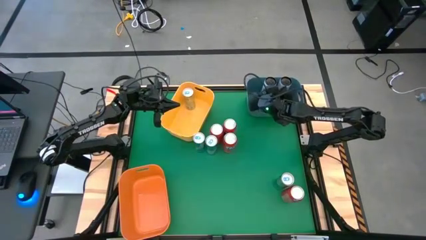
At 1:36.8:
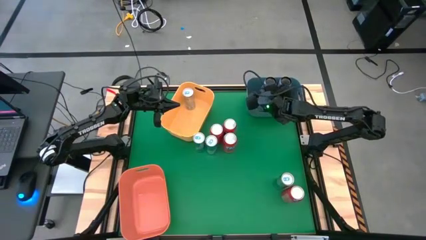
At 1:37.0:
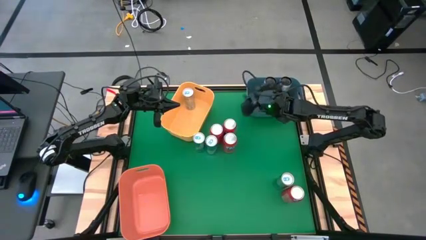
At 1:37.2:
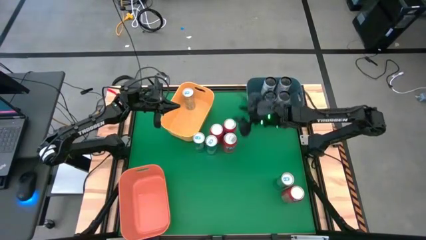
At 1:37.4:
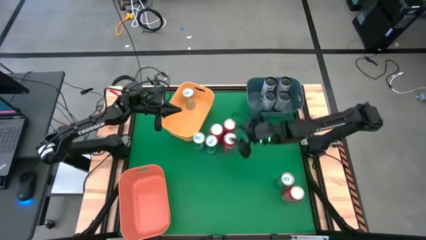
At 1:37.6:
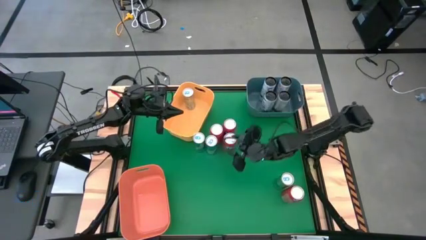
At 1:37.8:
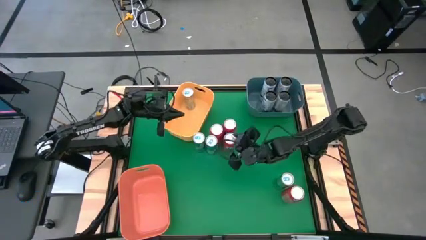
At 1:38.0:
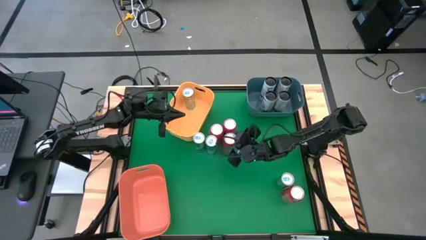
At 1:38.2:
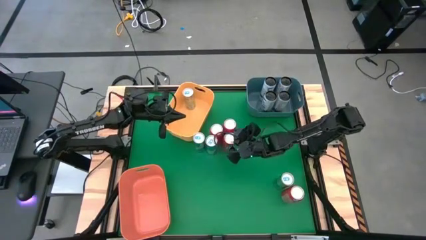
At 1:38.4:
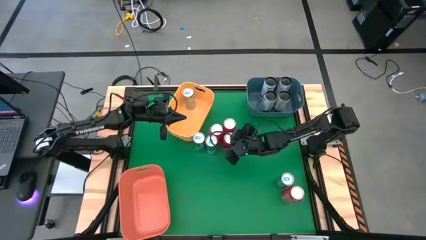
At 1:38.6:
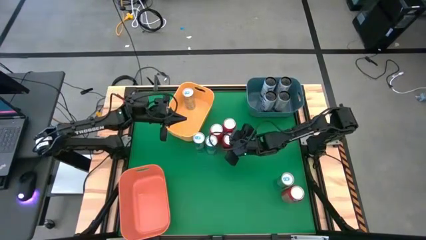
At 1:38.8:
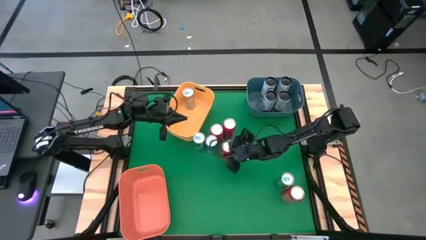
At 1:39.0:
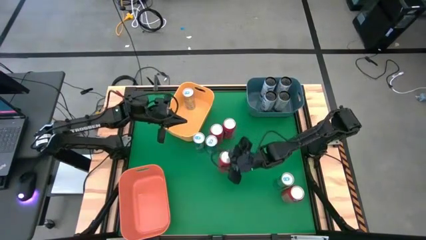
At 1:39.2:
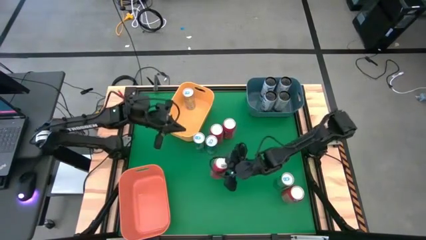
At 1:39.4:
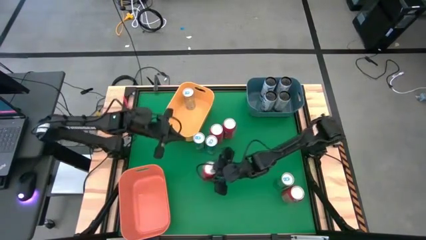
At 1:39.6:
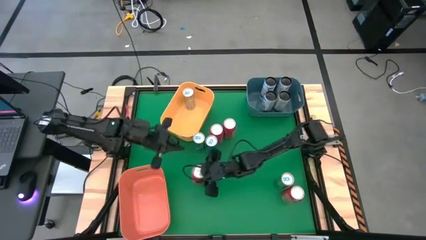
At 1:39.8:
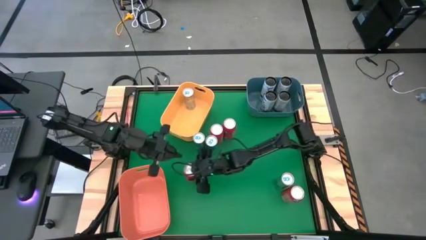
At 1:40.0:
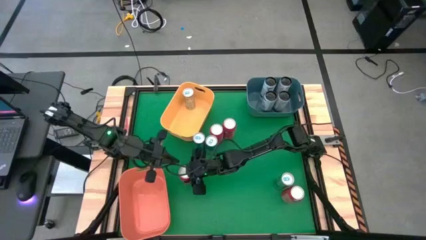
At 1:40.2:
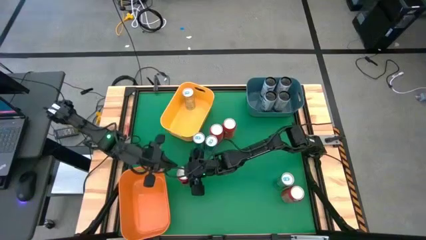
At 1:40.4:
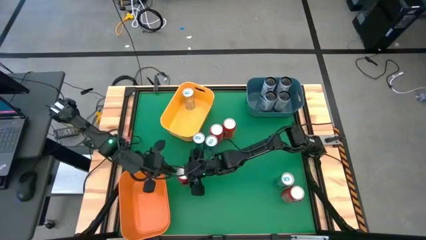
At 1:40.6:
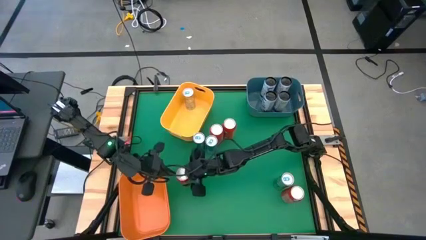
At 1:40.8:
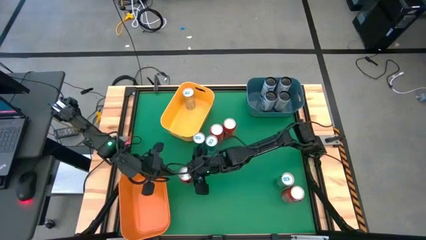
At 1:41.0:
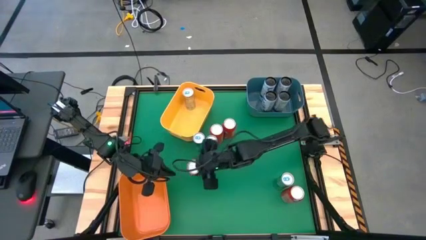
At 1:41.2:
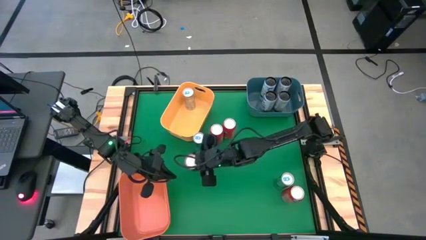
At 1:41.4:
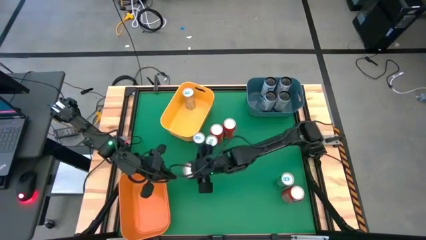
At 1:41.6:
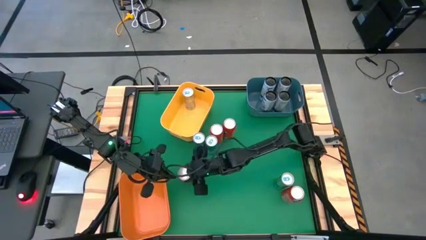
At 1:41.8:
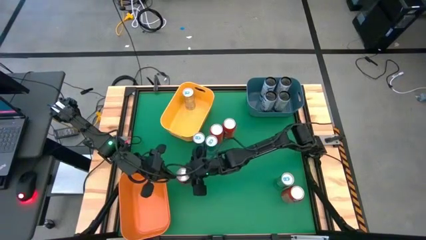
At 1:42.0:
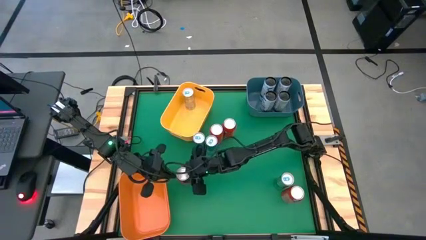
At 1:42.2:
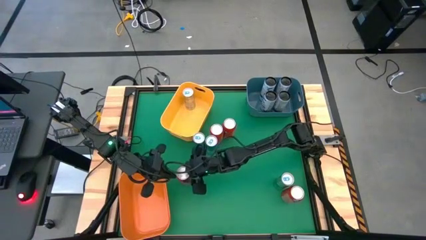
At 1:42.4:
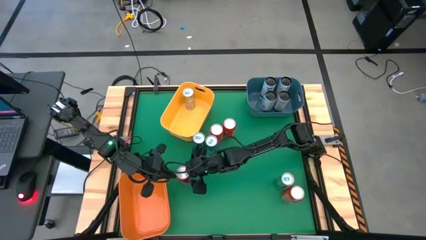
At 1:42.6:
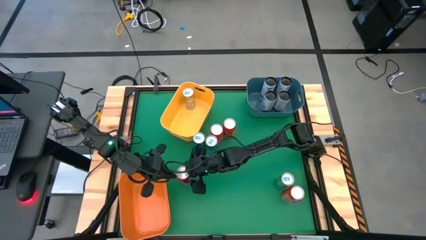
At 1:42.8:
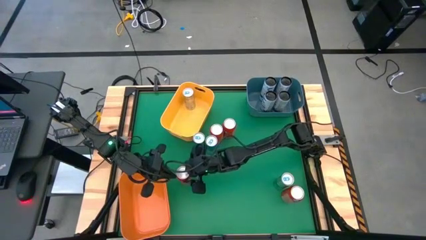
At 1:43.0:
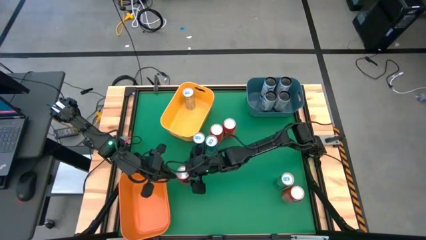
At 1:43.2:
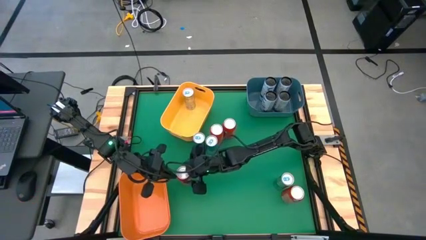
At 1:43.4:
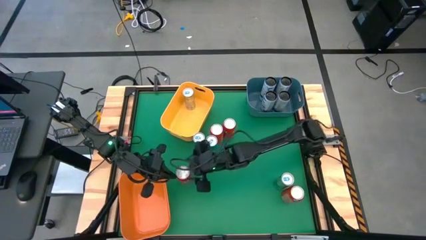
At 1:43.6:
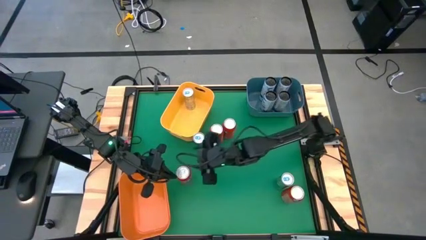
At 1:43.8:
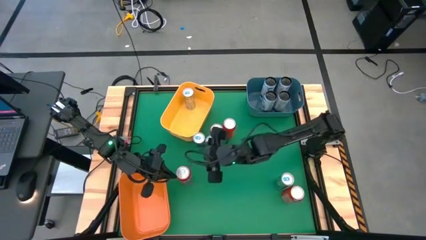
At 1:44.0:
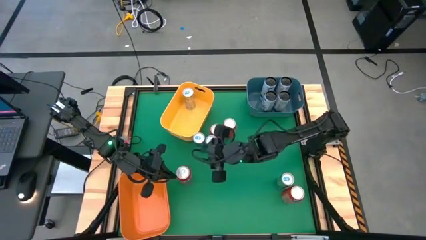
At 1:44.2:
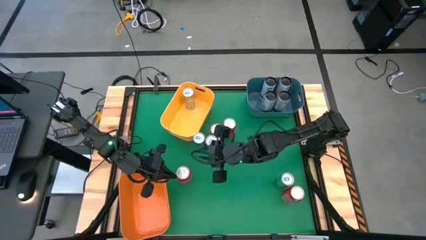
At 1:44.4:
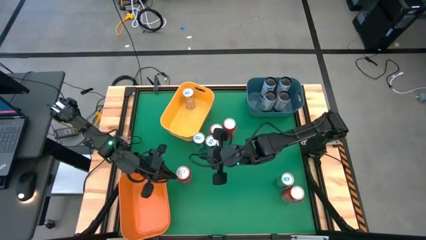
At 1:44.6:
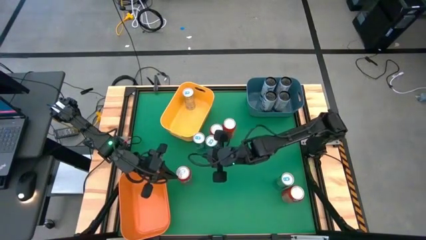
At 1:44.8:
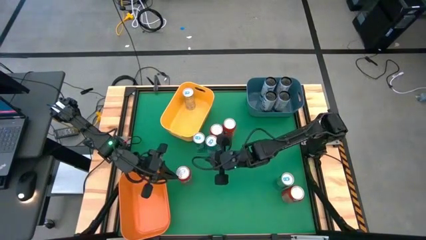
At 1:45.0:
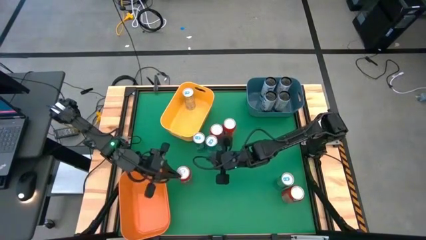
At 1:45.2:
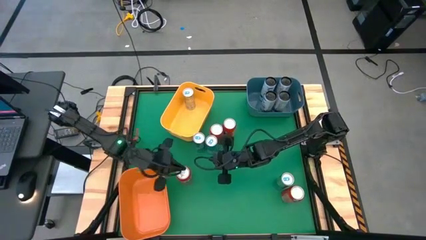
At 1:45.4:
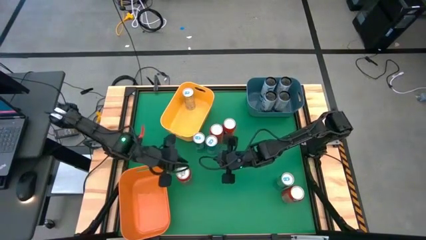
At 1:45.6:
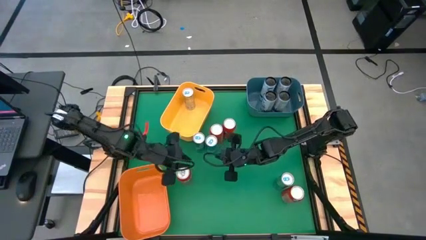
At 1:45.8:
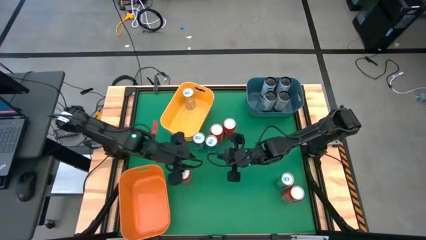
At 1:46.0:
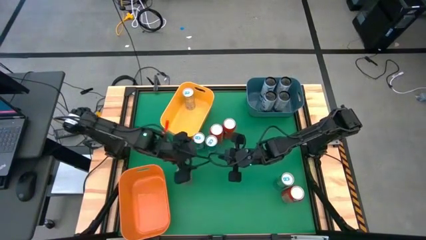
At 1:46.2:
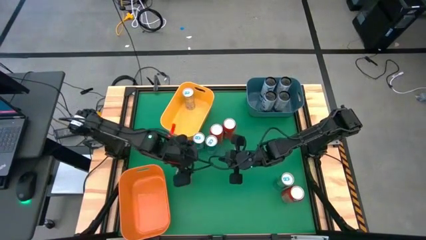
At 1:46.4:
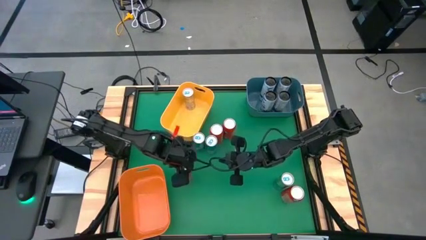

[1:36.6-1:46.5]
Task: Sort soda cans
Put the orange soda can into the orange bin

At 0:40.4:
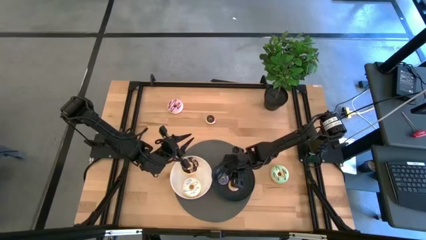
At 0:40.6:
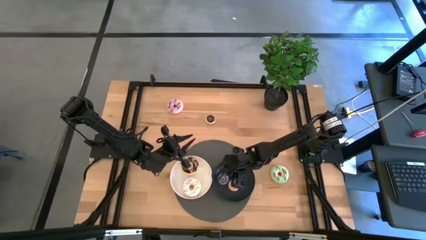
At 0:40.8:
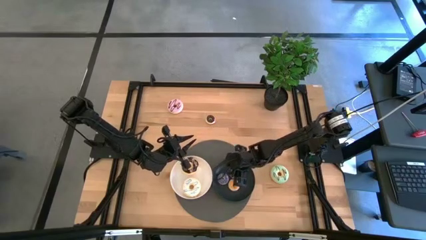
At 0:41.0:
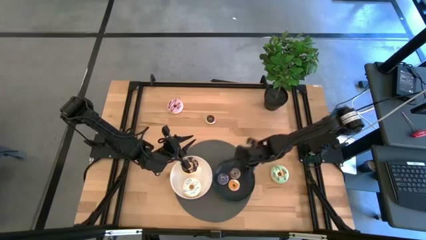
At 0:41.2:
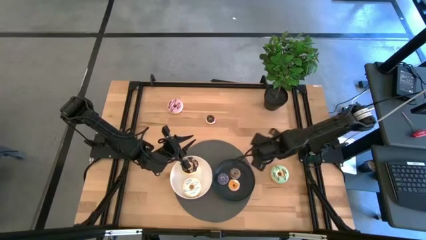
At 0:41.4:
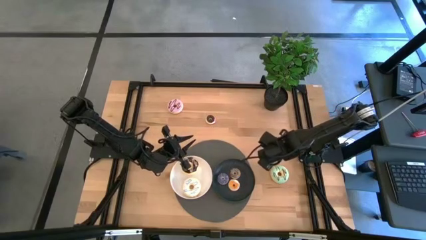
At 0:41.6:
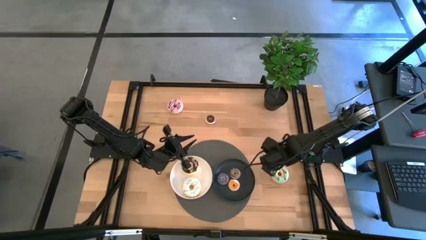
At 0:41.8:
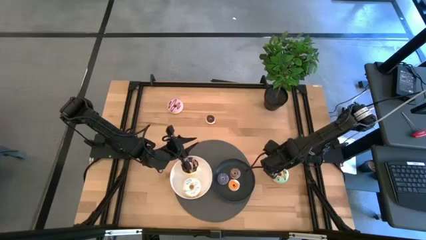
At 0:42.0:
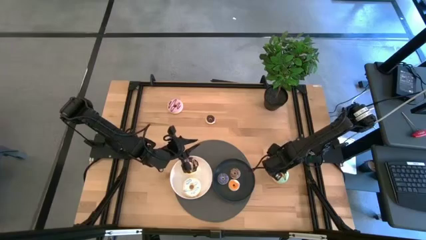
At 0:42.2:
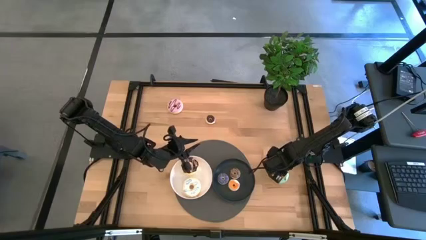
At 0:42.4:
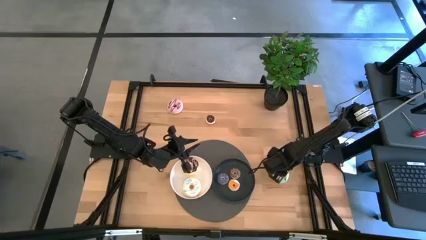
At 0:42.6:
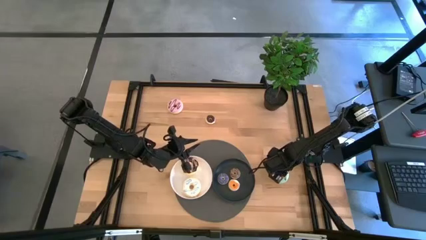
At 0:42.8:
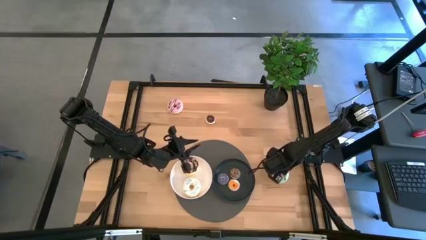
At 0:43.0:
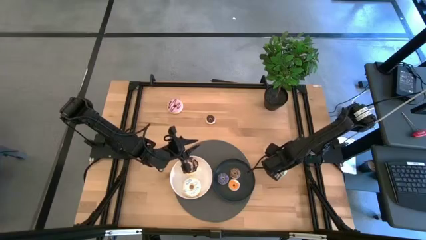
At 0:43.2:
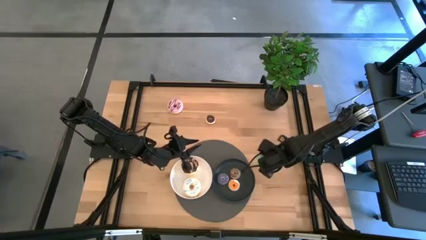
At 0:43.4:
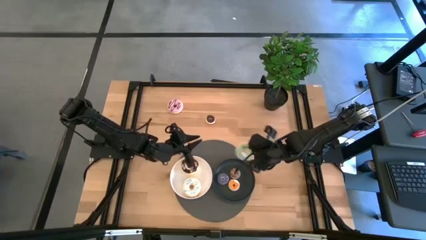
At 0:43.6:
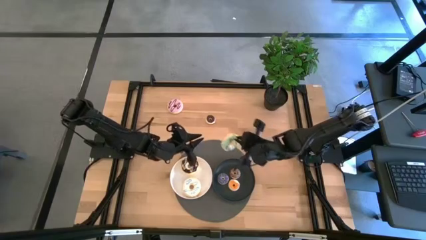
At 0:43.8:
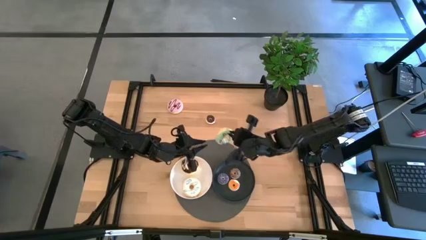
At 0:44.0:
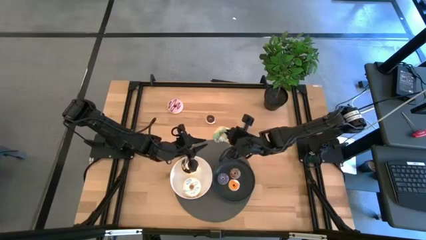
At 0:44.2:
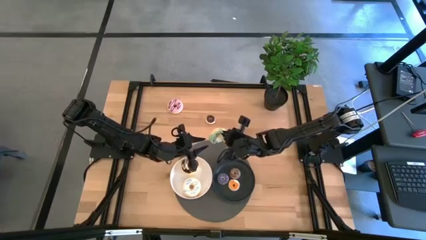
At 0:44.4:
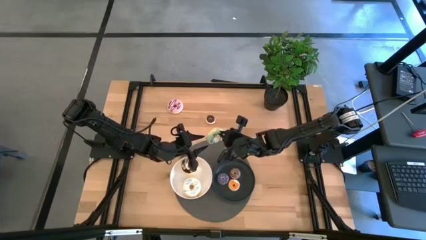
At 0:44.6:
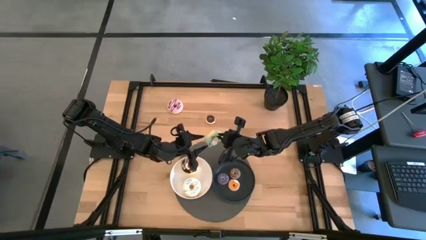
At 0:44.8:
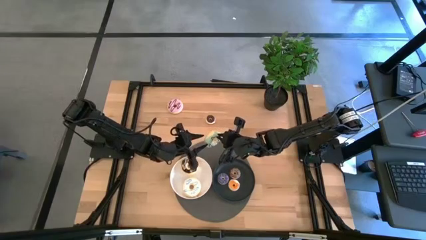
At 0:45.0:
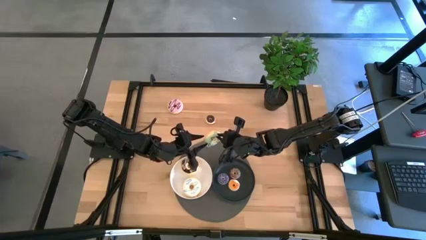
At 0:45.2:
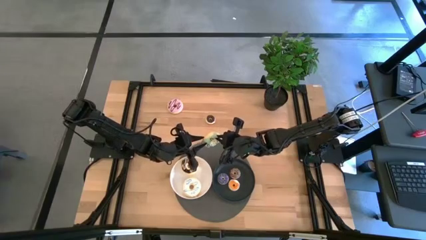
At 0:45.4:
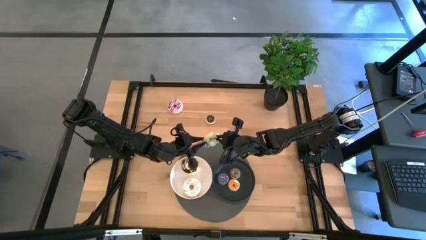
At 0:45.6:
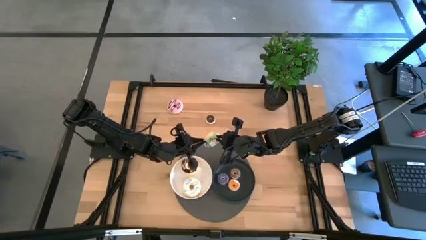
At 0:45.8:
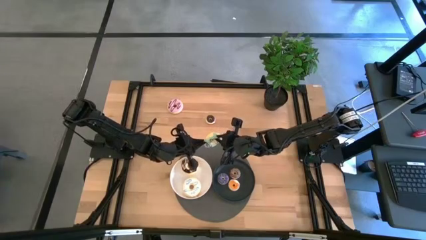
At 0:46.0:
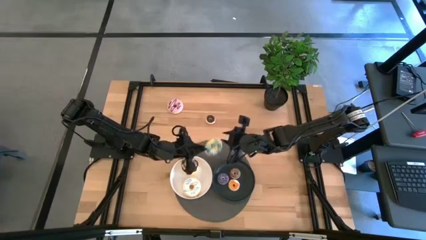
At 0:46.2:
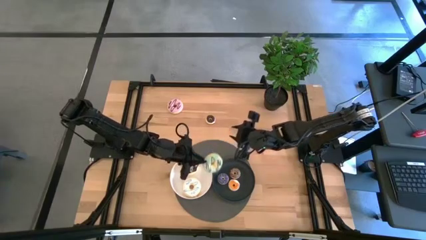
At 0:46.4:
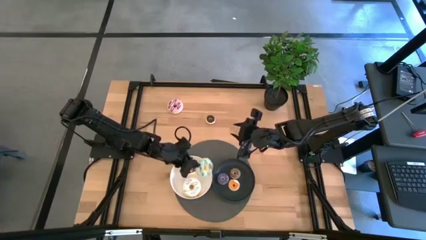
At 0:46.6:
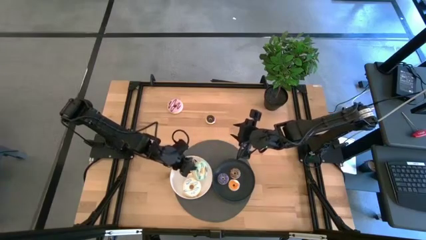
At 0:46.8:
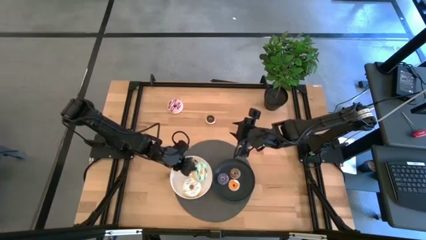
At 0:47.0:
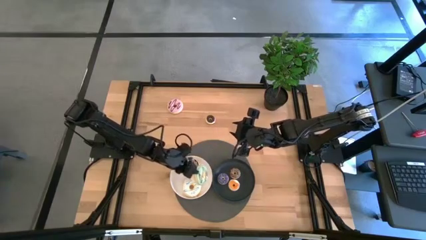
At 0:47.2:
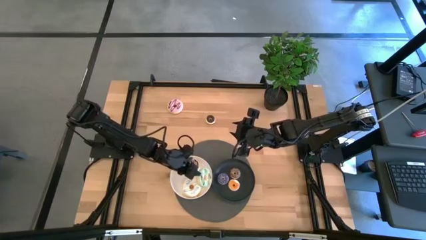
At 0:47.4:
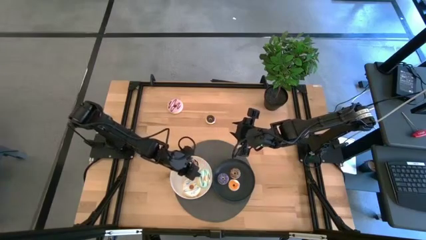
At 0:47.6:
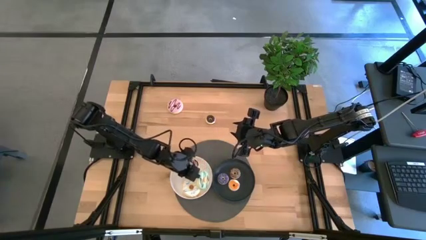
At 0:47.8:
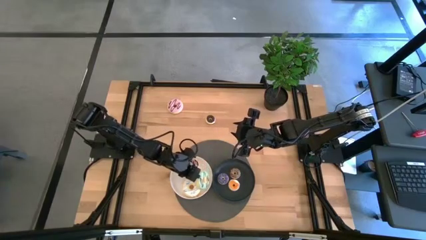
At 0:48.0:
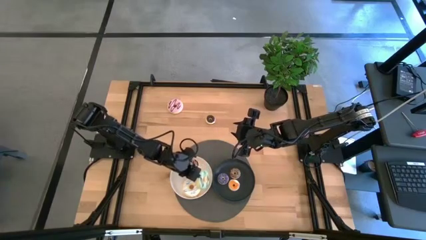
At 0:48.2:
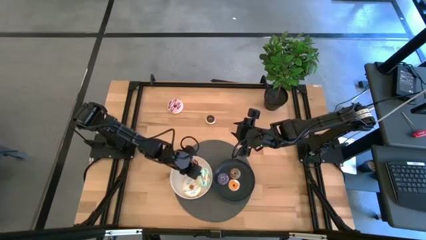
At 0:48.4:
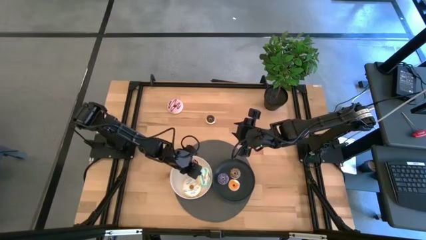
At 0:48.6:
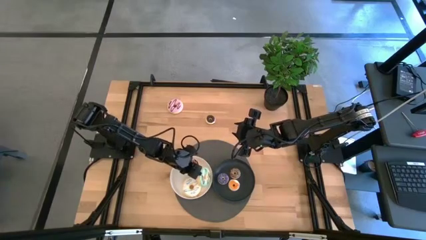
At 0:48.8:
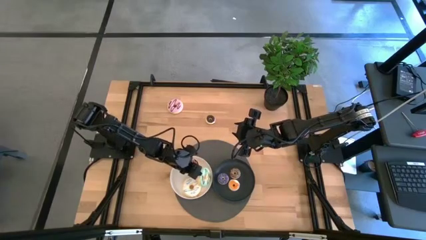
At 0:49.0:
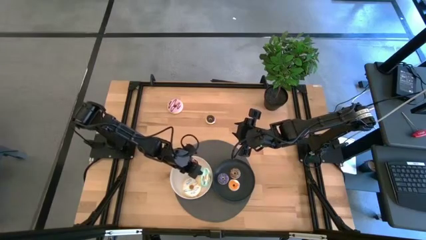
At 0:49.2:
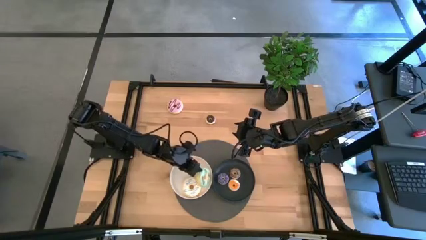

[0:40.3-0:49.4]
Task: Pick & Place donuts
Put the big green donut on the white plate
